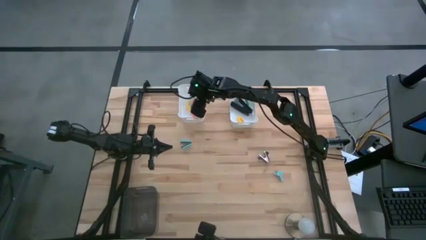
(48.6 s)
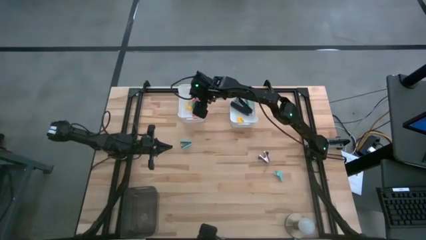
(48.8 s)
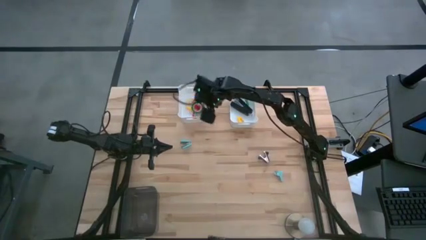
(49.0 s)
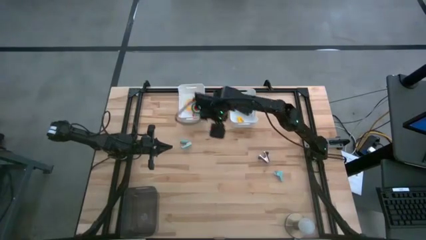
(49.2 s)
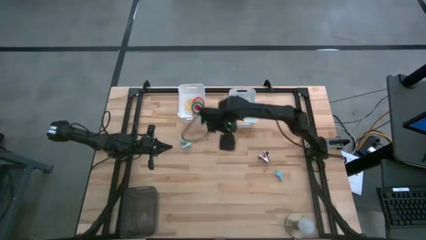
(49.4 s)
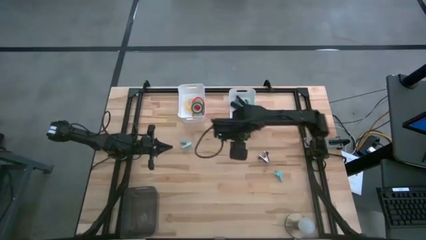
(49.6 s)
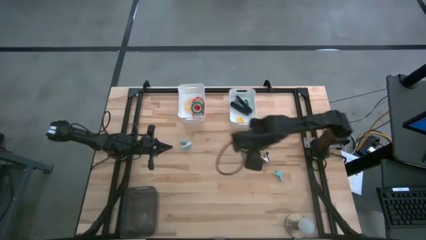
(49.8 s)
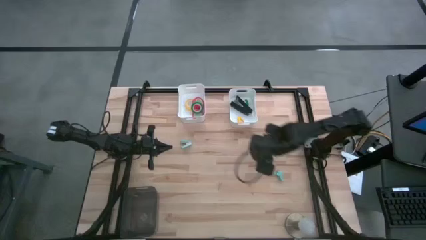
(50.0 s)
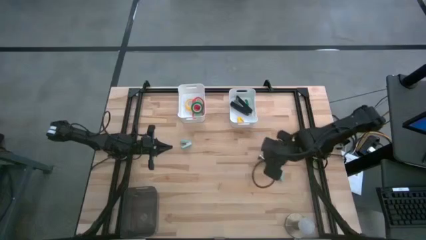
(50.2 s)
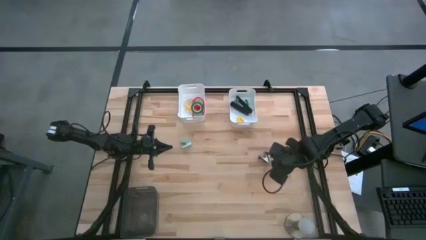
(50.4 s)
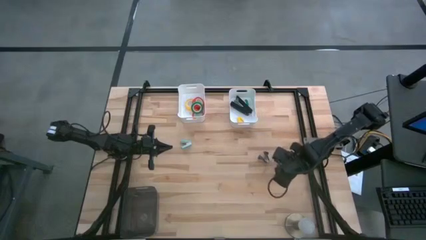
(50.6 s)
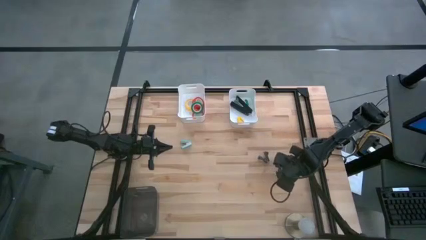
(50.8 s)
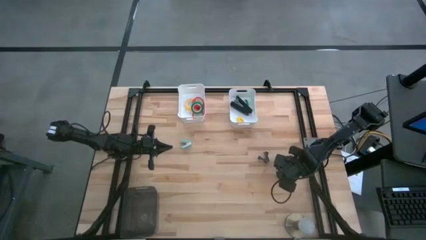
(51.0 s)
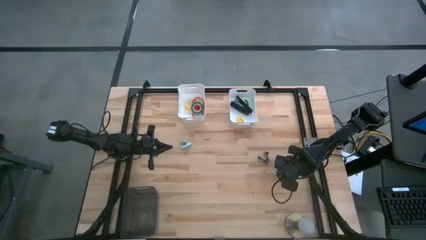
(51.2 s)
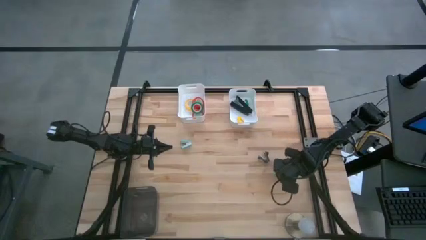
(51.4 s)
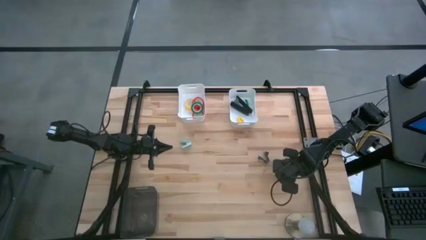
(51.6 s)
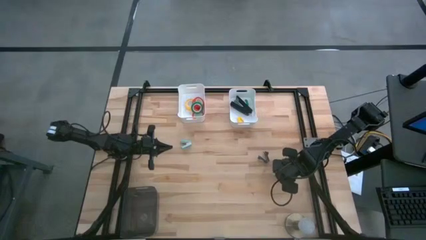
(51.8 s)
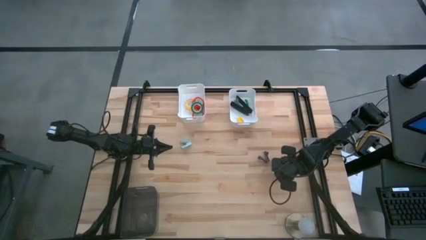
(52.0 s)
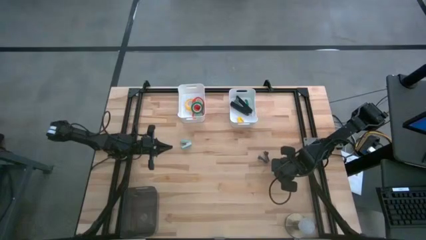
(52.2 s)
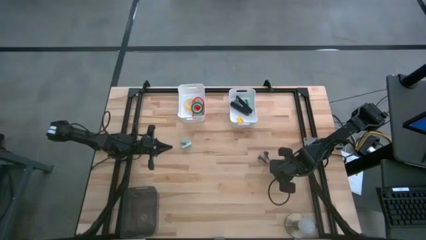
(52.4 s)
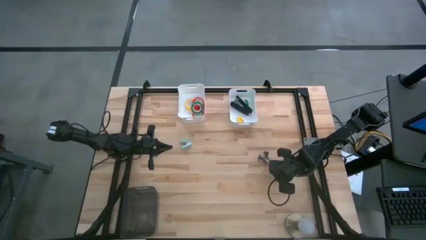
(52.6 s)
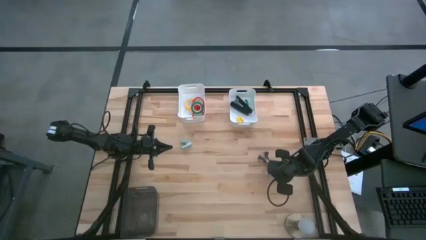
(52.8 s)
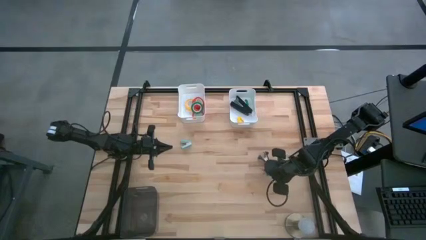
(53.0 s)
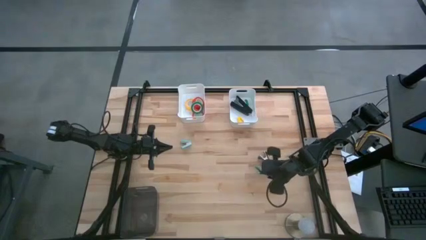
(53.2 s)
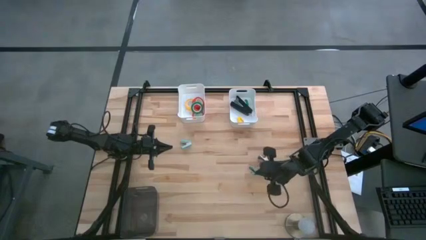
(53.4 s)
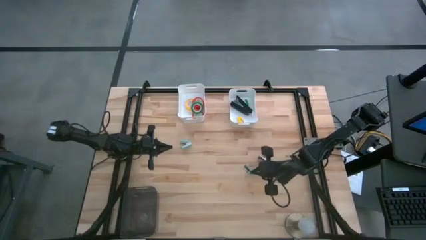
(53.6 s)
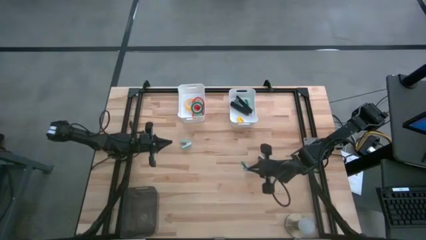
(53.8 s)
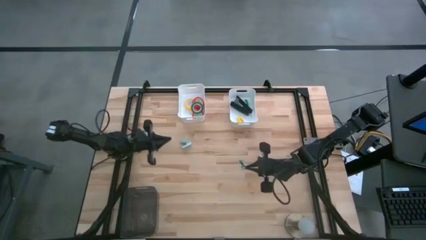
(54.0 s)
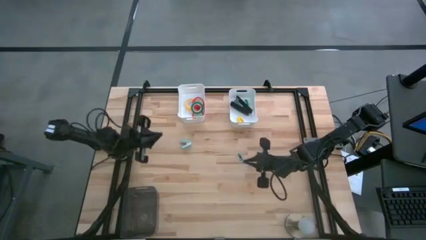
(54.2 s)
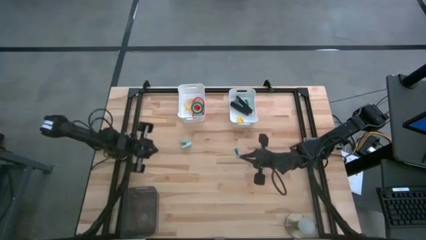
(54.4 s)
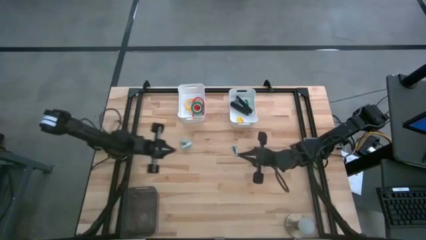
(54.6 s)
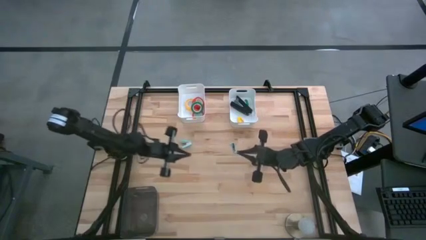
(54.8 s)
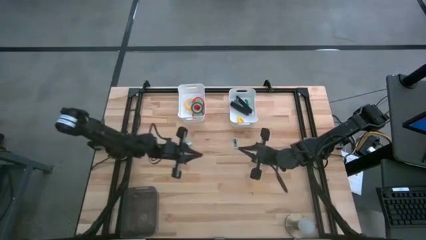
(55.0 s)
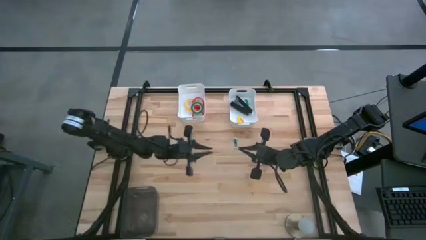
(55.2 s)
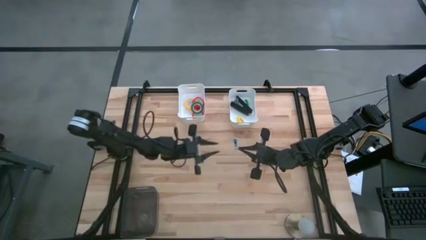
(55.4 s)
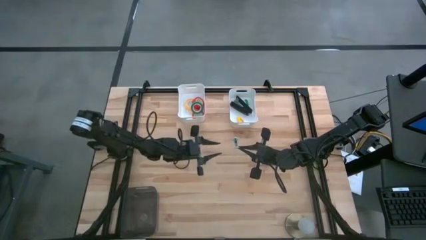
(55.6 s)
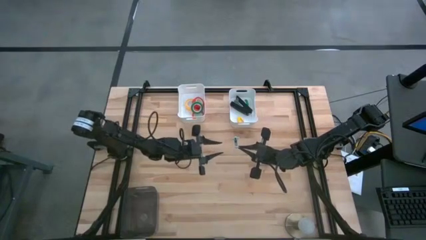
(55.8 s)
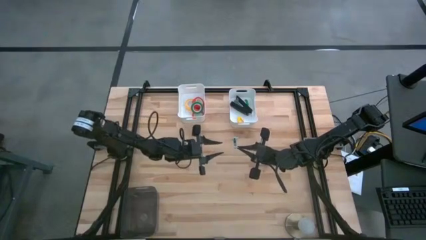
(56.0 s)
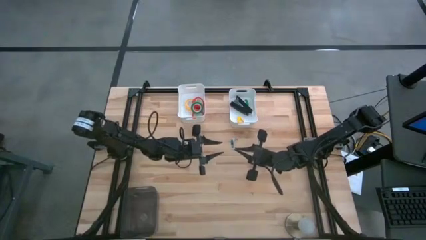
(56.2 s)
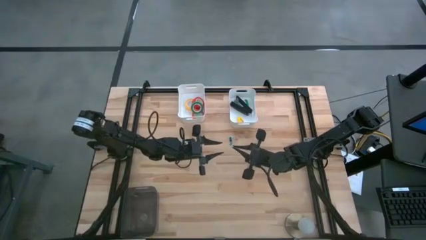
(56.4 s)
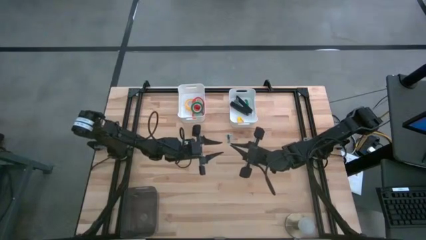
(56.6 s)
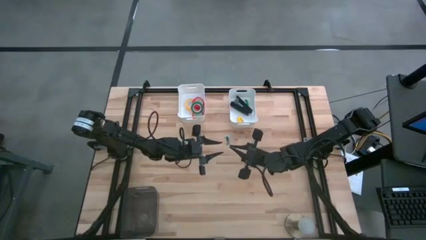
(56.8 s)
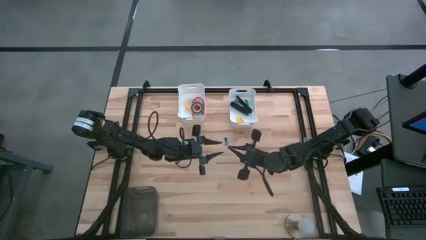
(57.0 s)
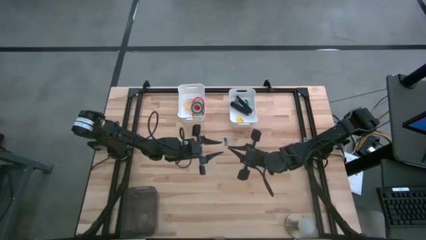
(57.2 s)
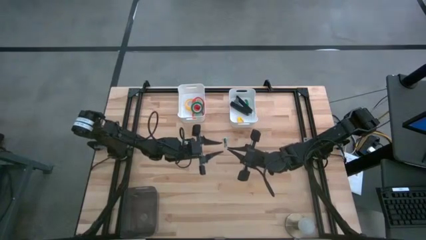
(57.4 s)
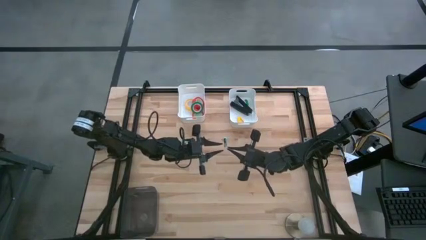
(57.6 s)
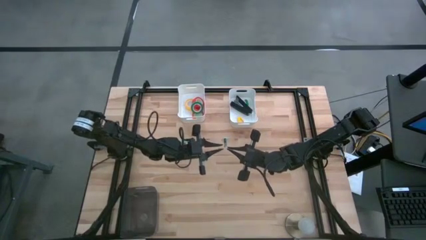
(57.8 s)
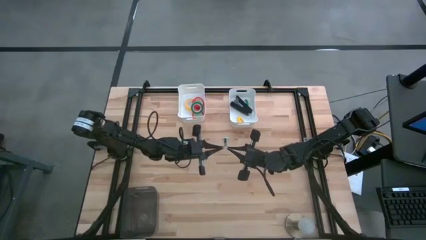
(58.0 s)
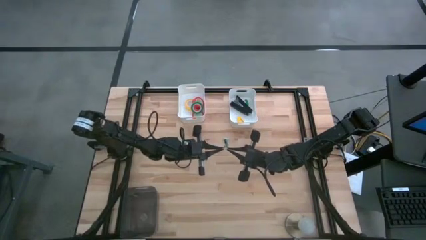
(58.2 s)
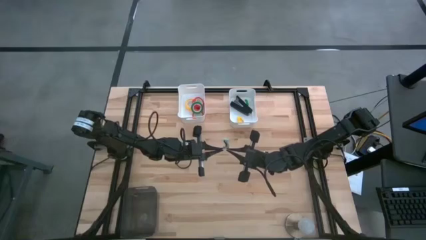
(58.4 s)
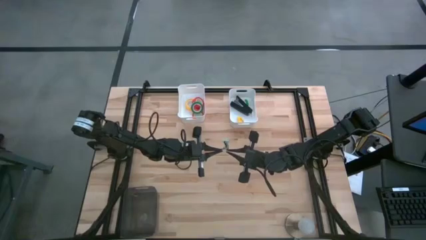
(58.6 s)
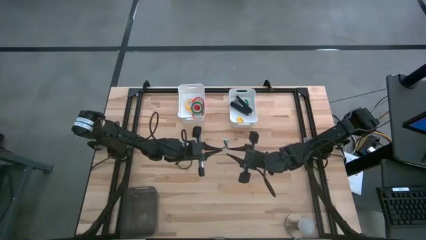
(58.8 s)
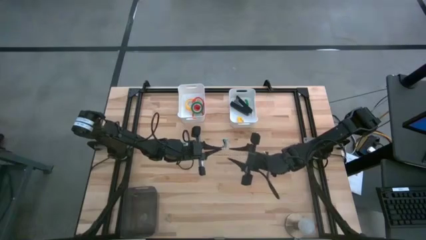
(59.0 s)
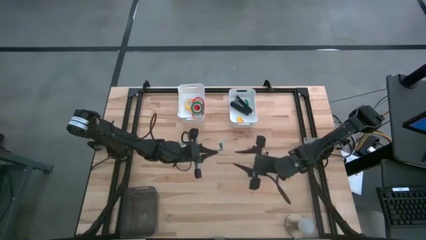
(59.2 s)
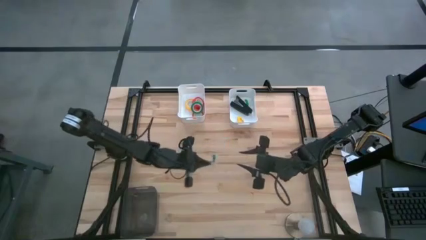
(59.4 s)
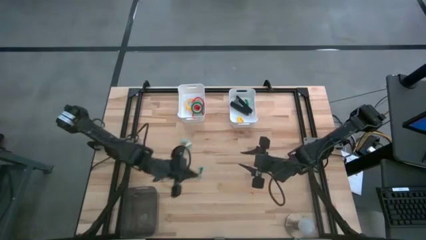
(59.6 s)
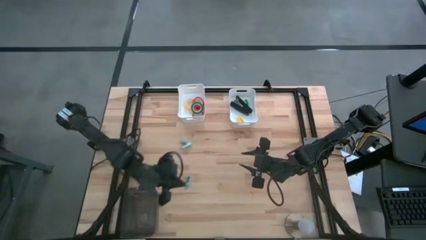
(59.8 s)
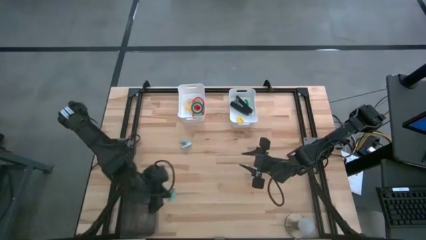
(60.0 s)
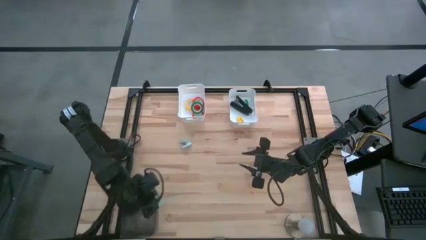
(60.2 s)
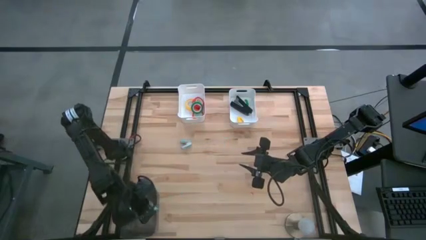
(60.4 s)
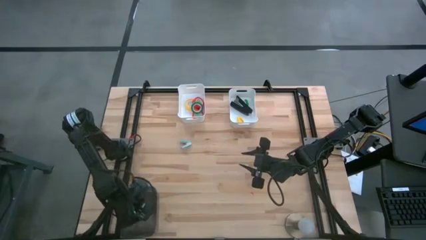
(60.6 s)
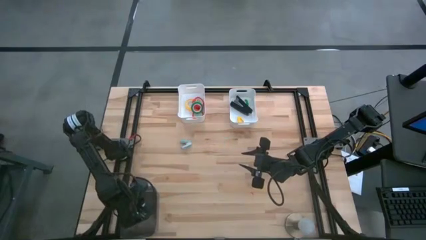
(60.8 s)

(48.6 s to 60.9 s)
Task: Pick and place Stapler, Stapler remover, tape
Put the right blue staple remover into the black bin

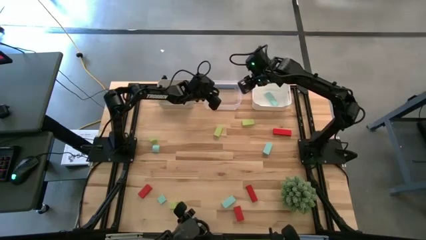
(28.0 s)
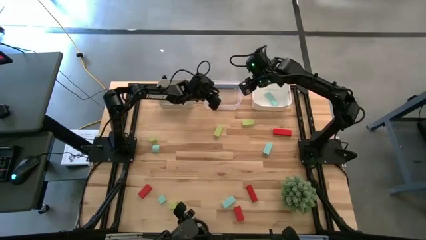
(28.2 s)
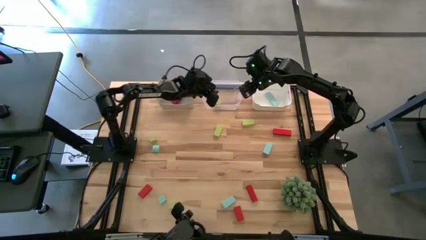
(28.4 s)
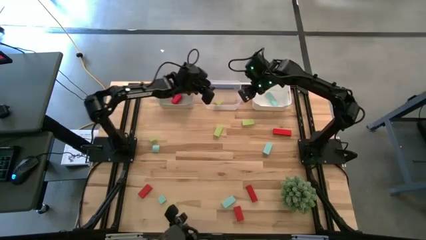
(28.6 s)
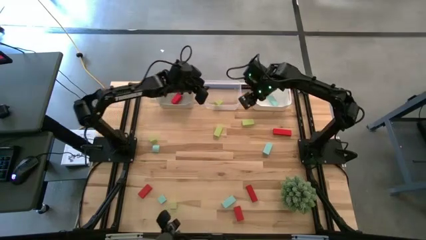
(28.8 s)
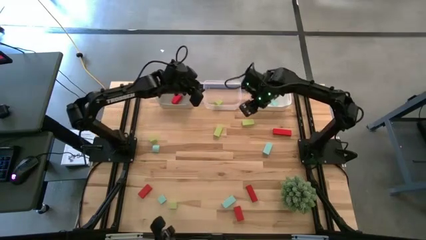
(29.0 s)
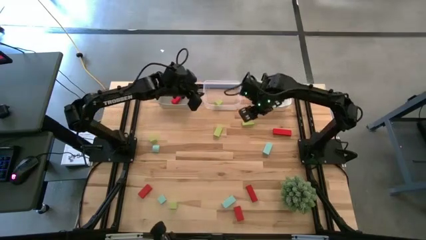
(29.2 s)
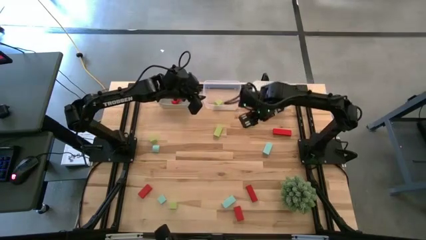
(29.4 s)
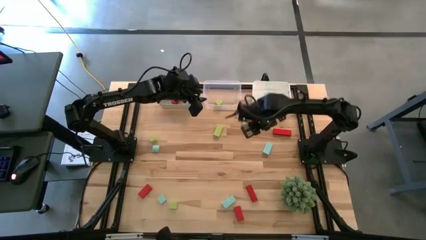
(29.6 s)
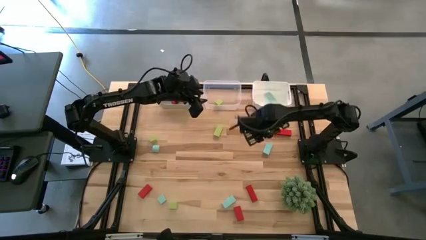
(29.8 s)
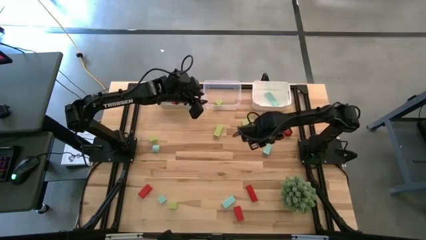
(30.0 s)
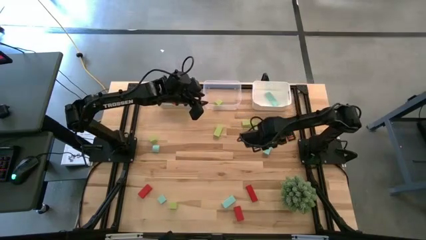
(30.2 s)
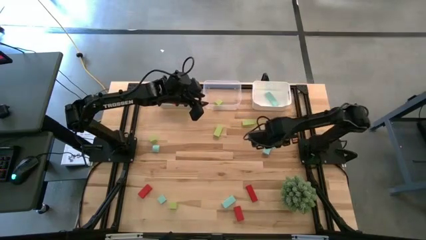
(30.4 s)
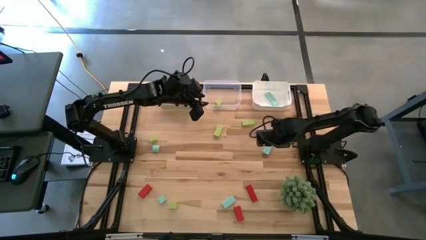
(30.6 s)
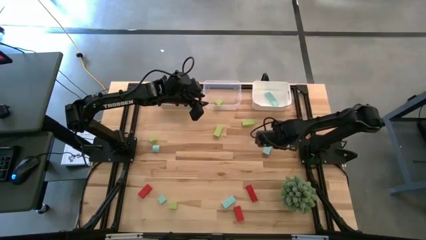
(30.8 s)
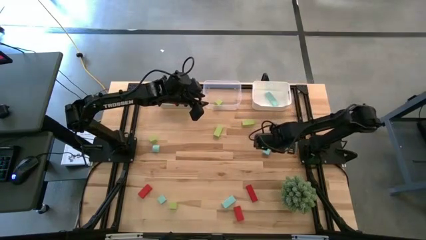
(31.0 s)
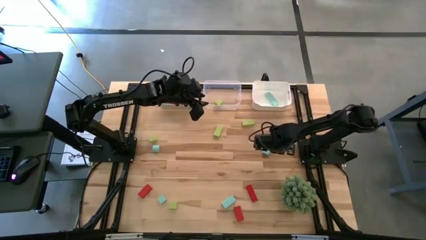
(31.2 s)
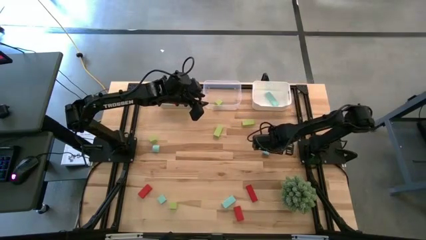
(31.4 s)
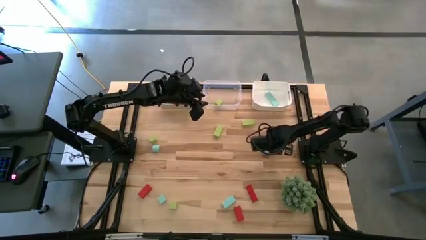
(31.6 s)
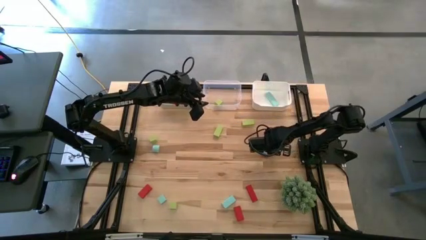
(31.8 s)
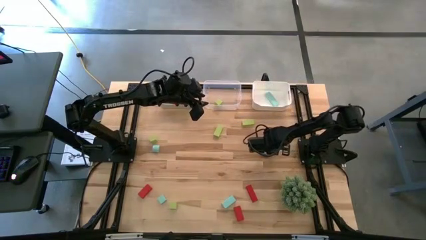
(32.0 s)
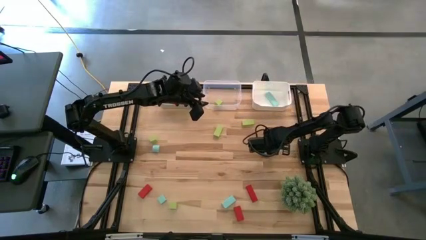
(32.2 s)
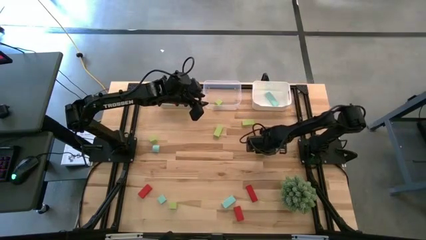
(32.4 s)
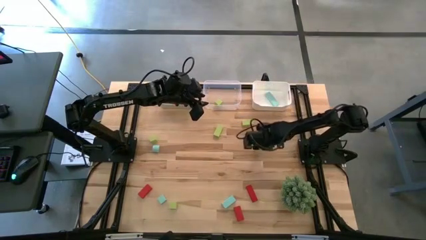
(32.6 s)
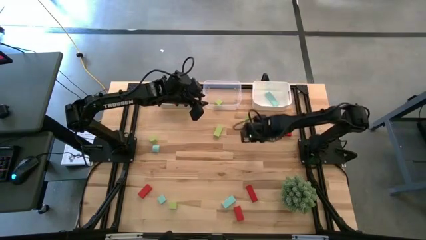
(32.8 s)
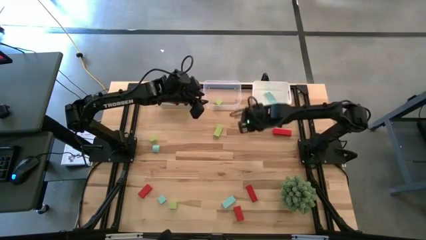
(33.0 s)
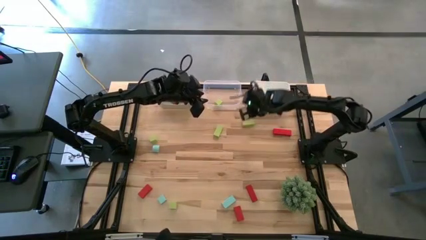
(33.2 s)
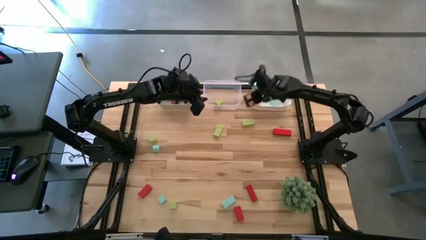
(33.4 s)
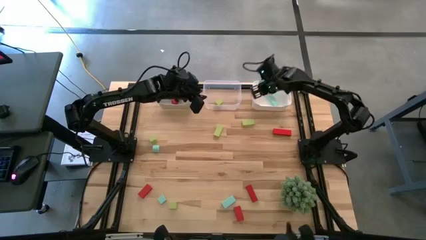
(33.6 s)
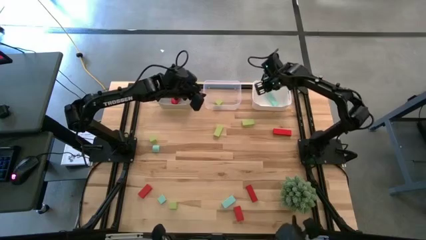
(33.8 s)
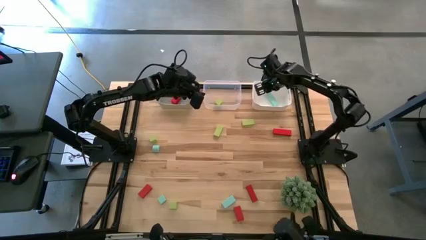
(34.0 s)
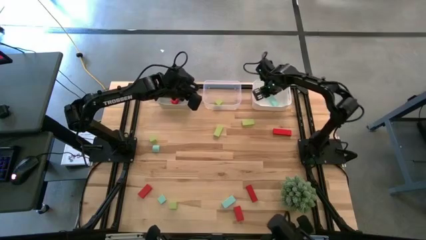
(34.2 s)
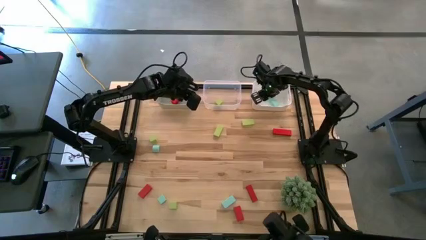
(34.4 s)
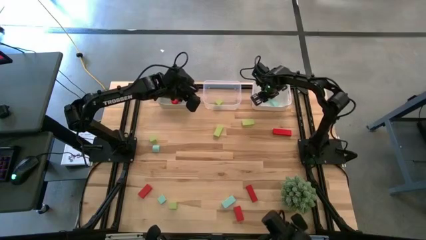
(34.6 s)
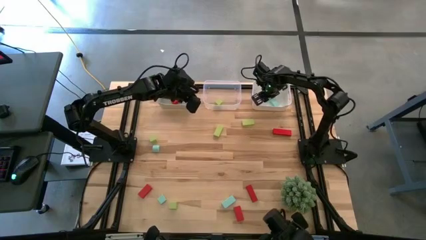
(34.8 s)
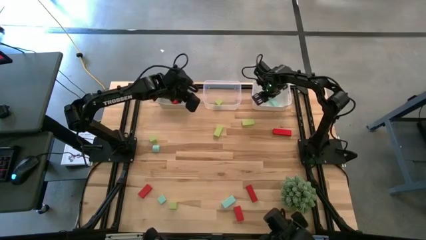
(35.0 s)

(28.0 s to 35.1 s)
Task: Sort & place blocks by color
Put the blue block into the white bin
